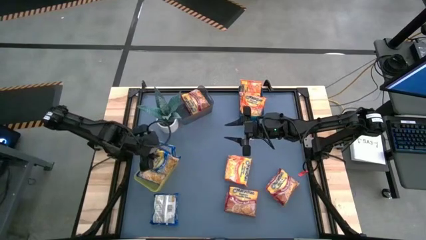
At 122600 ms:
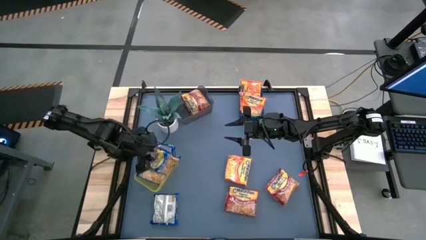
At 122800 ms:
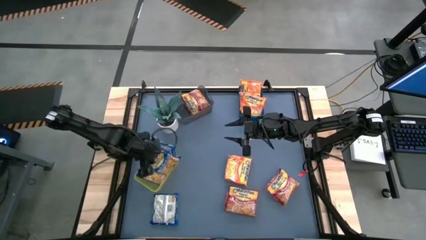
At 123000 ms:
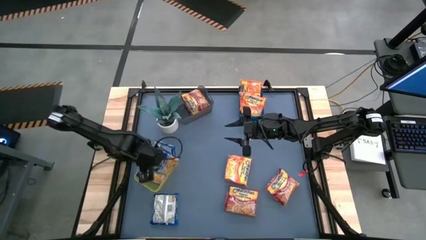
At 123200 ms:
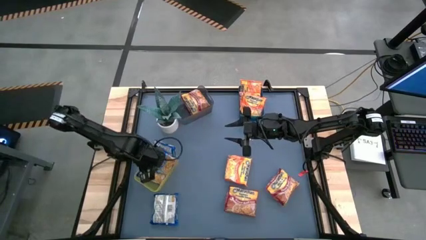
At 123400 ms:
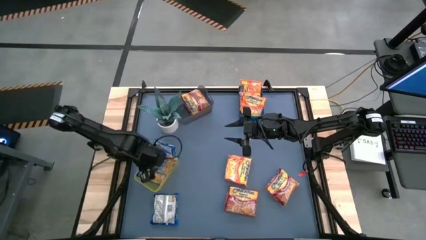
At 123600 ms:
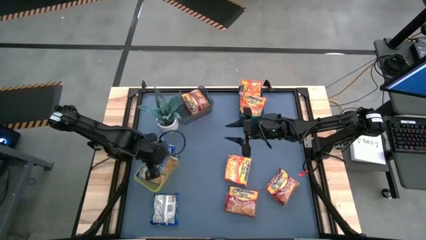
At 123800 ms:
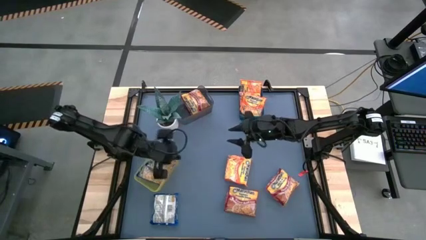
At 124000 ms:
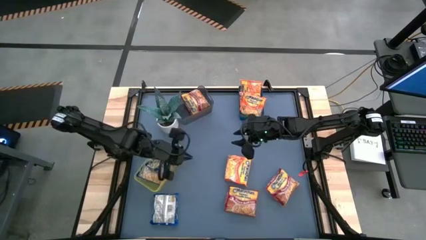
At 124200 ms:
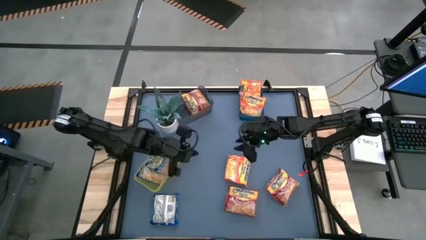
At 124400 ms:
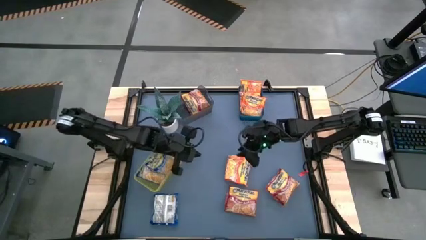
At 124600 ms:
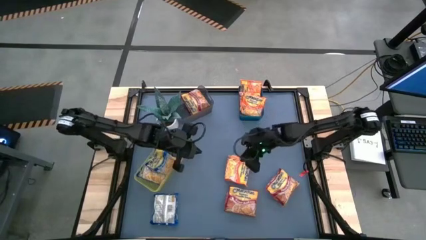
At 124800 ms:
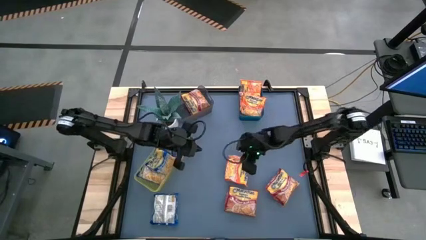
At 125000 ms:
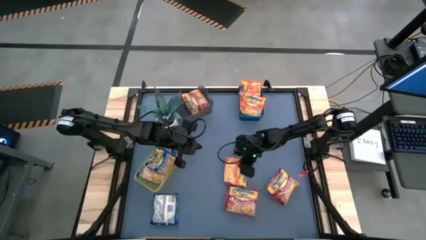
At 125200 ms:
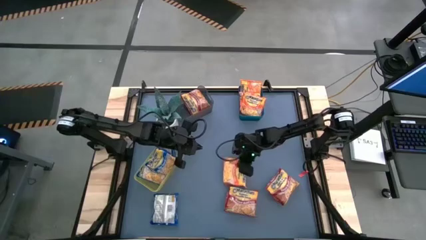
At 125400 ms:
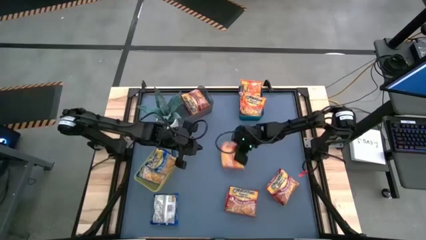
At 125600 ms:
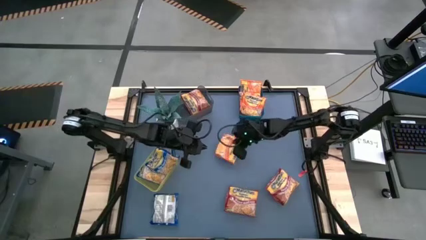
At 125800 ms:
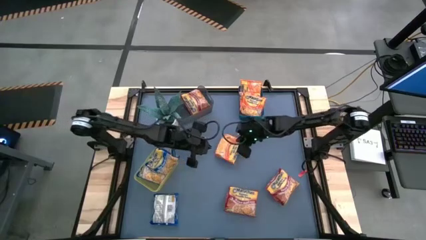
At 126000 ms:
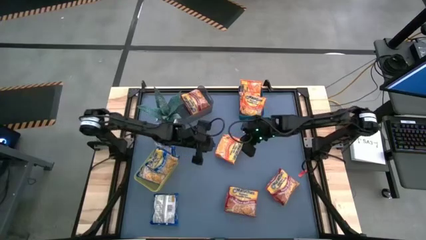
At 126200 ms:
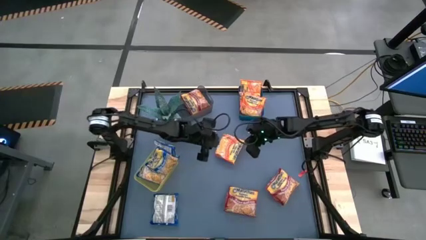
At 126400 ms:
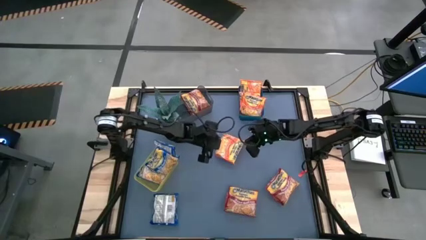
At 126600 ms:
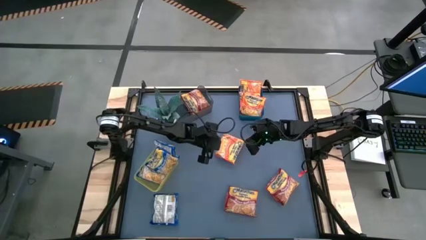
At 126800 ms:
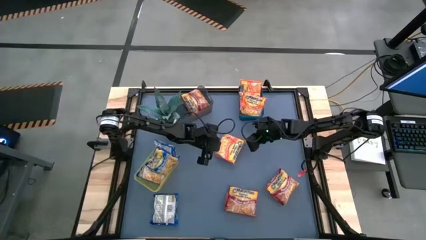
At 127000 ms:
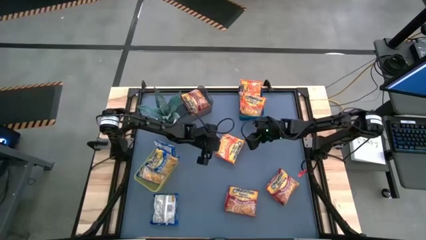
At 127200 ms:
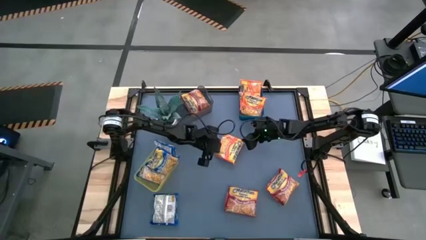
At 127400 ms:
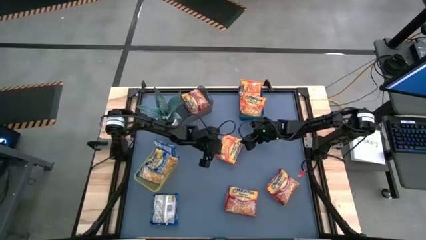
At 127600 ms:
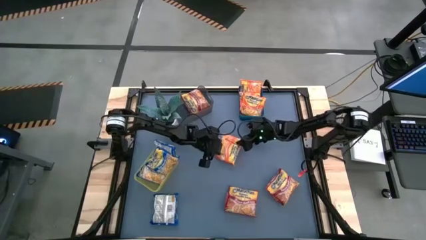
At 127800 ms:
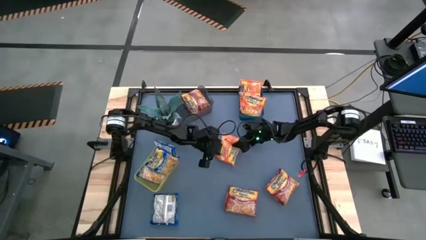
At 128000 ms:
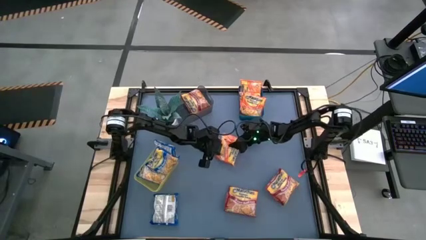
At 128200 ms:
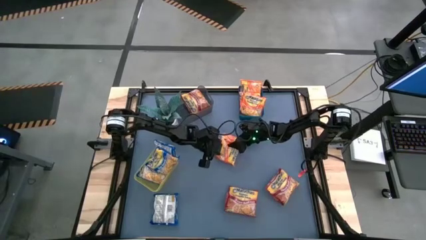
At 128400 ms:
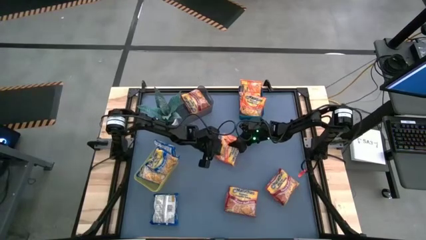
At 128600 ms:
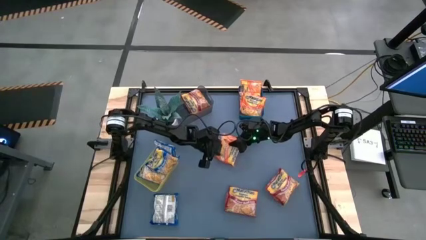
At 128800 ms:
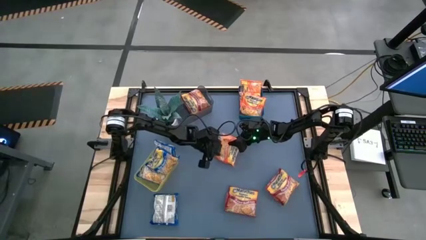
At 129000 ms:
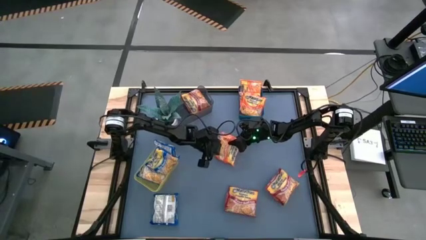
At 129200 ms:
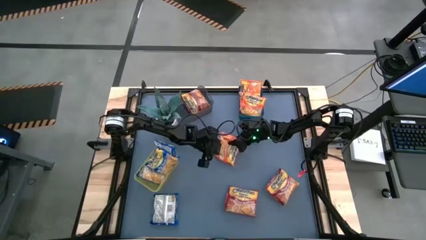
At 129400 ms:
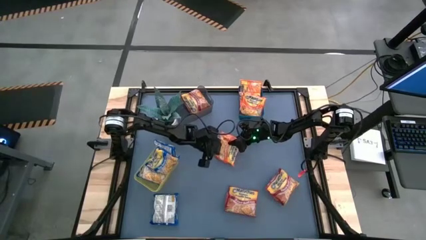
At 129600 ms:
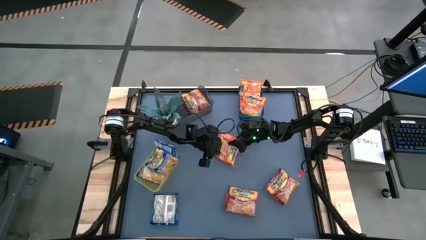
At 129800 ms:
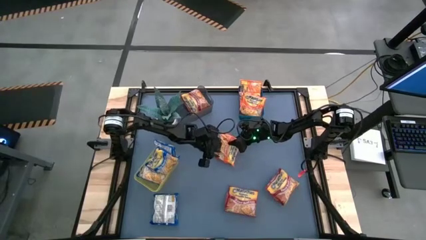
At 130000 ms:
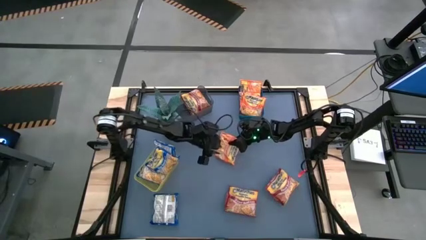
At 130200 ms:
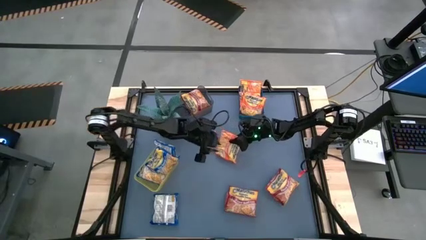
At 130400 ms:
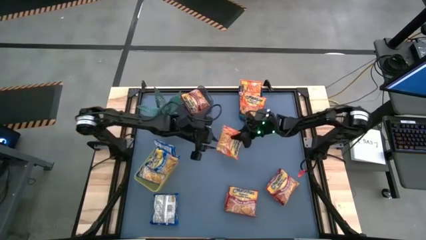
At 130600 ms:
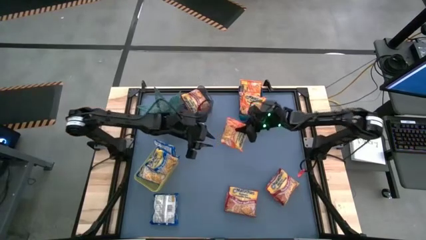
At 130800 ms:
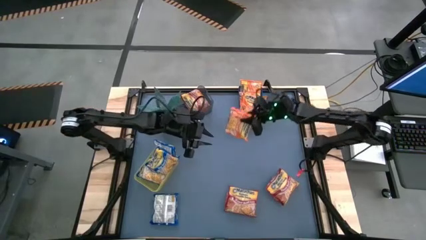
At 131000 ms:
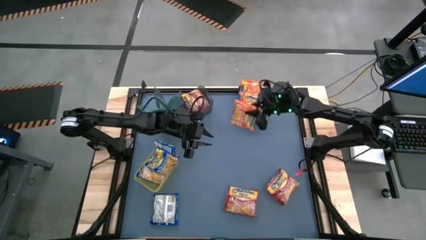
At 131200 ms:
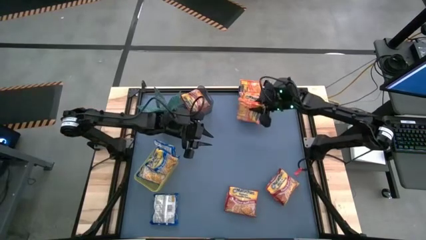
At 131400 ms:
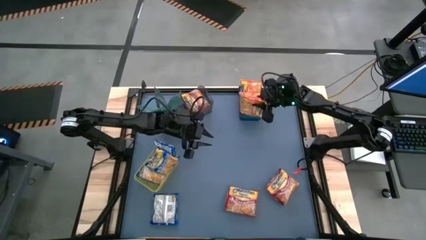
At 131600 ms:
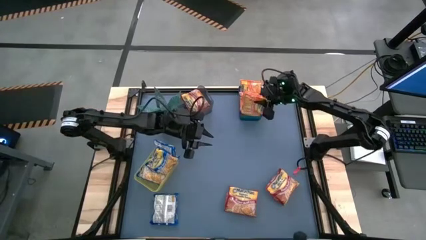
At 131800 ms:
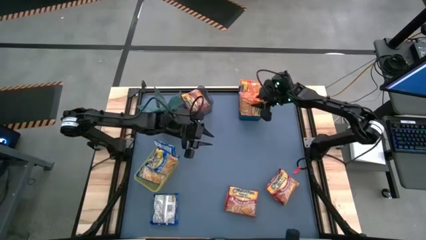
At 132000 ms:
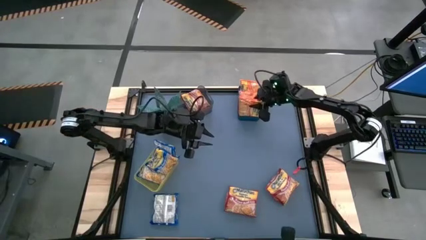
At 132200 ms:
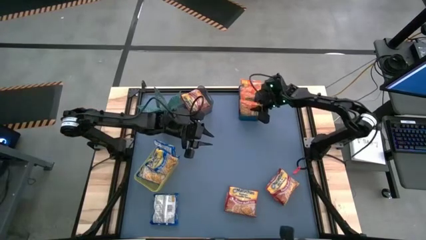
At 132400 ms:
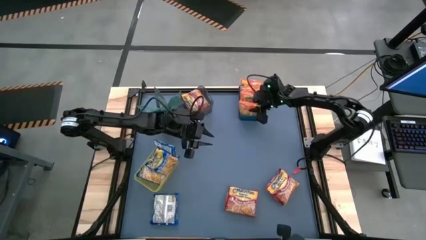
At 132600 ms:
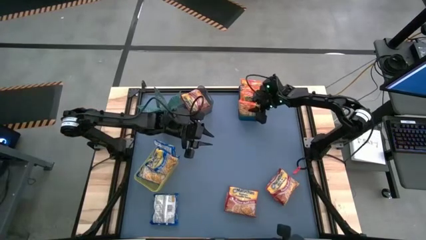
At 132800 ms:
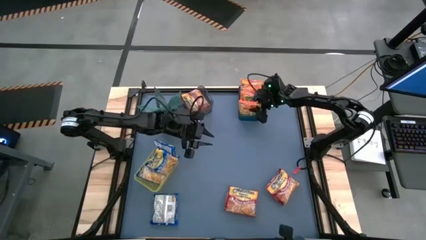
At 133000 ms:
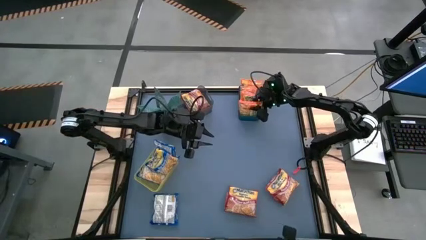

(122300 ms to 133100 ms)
Task: Sort Maruchan noodles
Put the orange noodle pack into the blue bin

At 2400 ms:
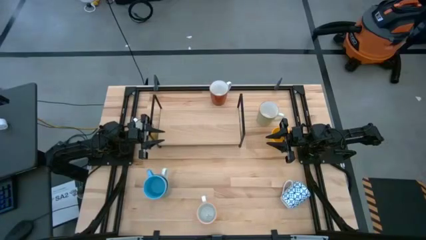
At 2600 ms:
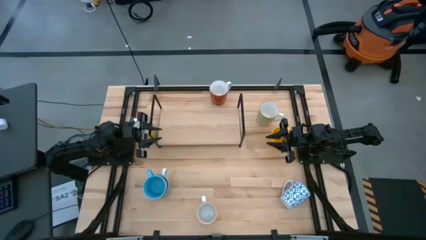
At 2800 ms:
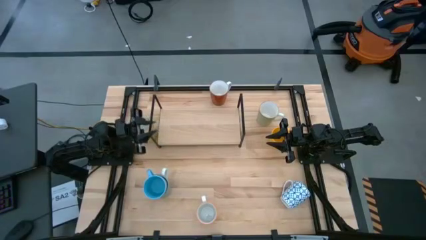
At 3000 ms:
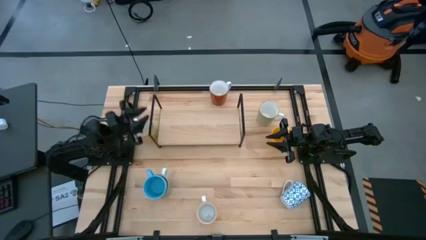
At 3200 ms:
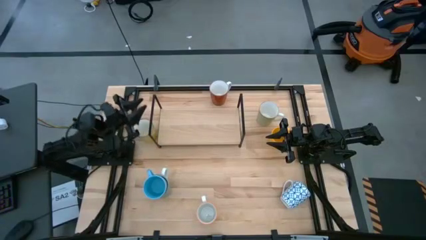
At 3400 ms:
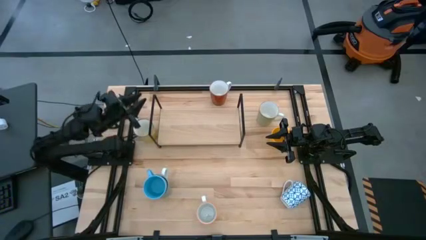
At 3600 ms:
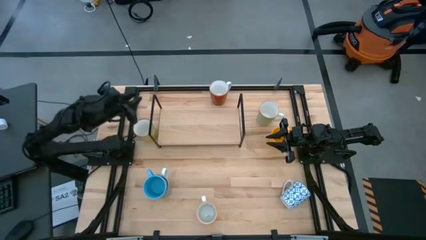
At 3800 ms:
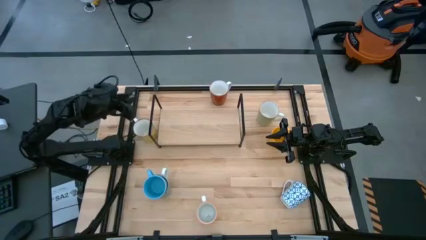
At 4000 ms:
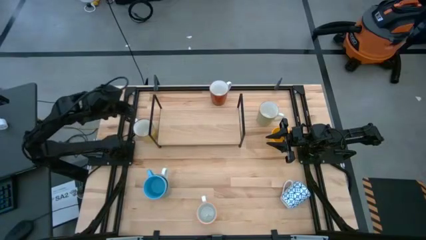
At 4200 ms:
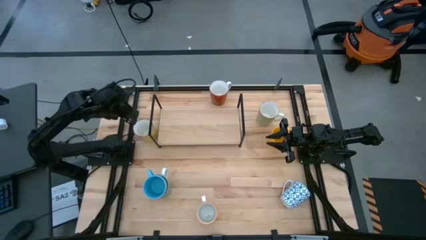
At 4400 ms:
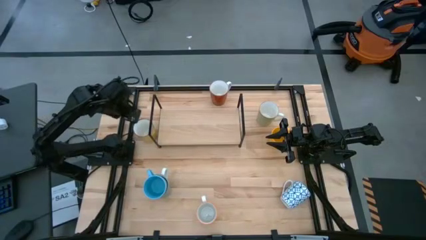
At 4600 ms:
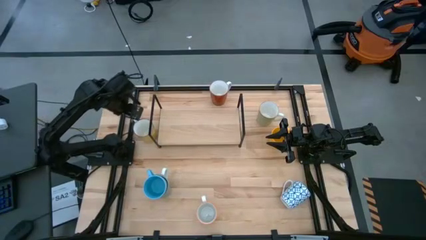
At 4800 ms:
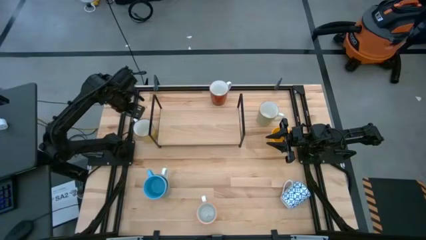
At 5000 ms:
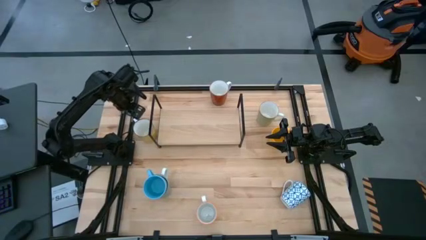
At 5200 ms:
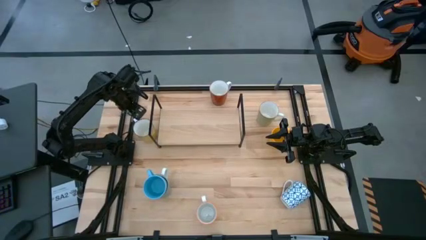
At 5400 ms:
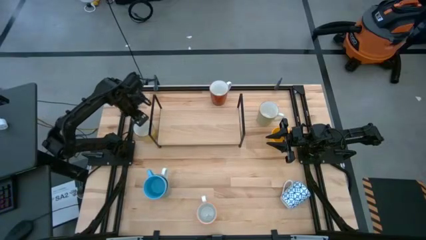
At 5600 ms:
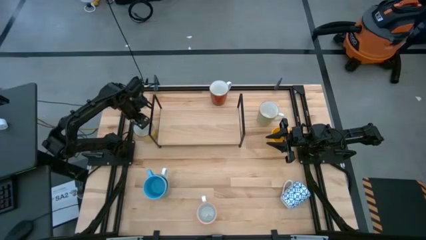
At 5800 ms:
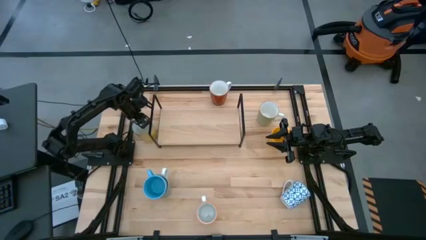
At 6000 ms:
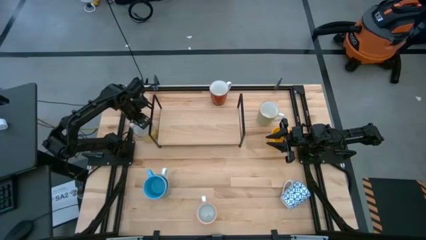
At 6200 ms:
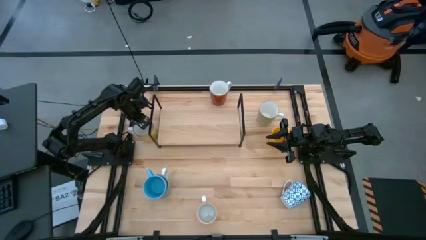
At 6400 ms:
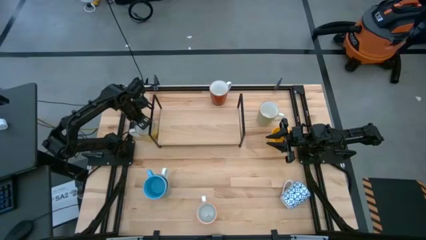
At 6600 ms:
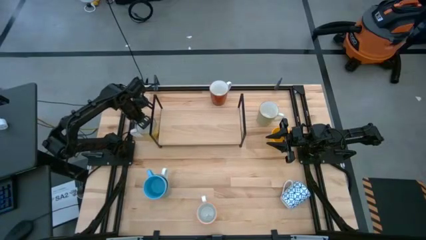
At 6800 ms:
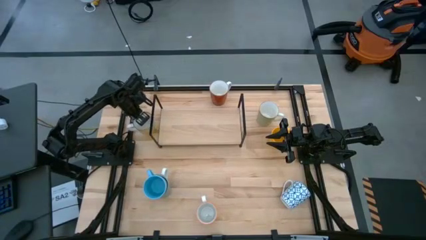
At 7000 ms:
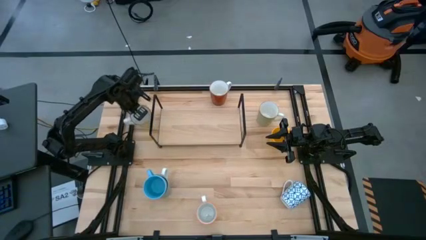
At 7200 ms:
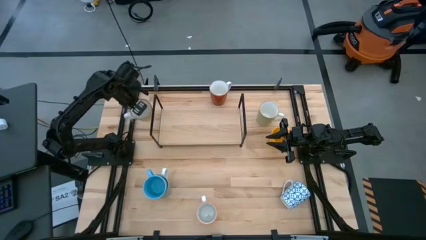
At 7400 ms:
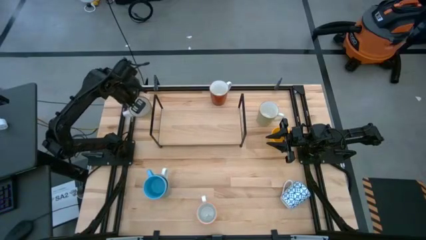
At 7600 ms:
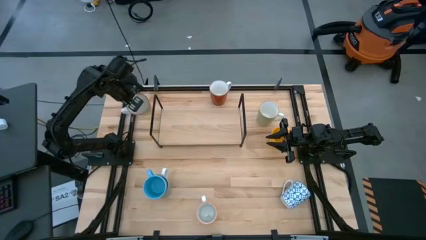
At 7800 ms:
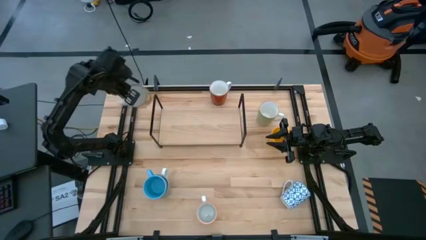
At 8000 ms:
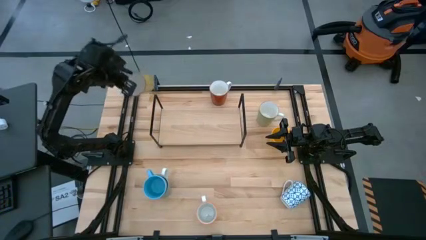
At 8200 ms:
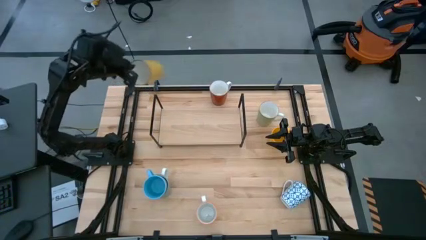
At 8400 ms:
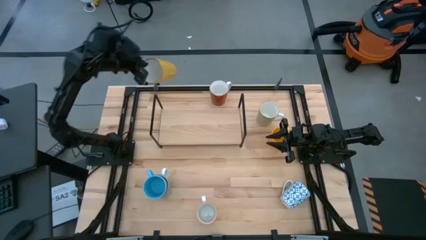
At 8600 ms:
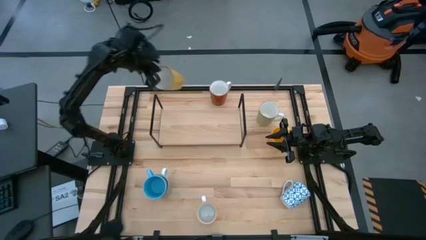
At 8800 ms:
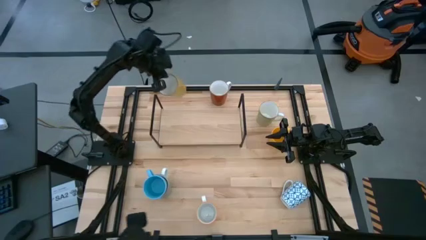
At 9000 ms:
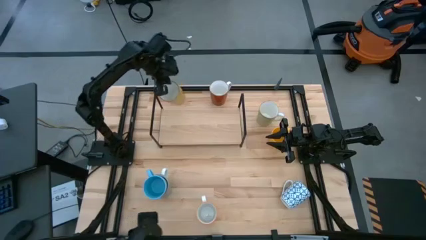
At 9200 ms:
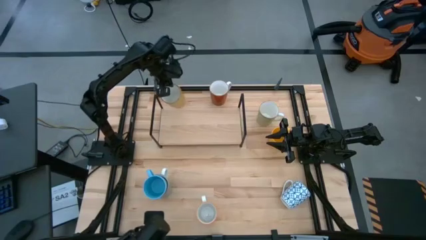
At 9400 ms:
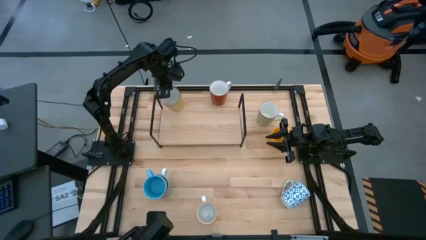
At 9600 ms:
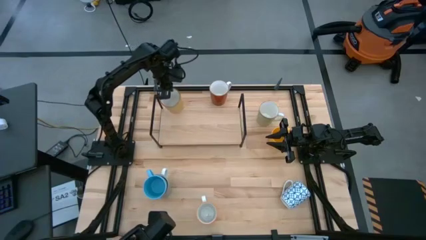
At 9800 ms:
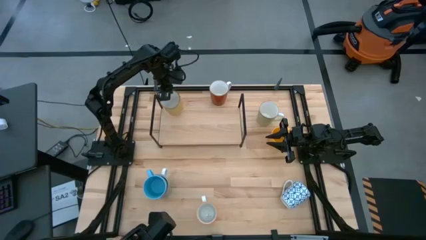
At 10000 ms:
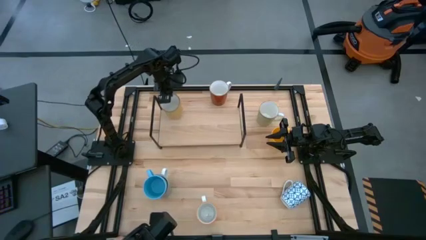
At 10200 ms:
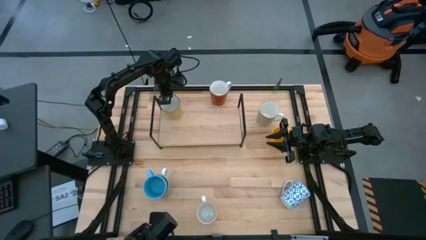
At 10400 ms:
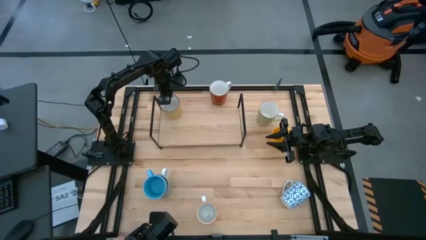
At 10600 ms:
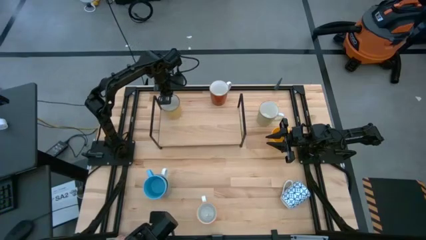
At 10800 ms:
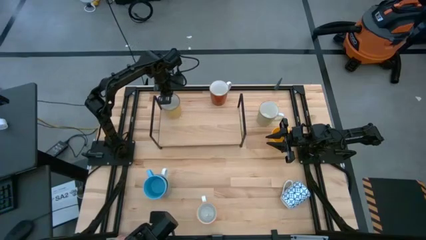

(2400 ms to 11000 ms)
Task: Place coffee mugs
Put the light yellow mug on the shelf
